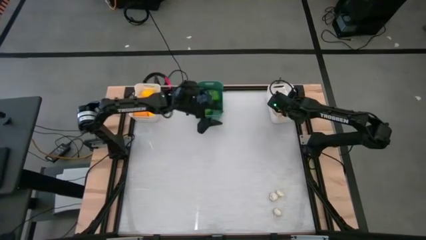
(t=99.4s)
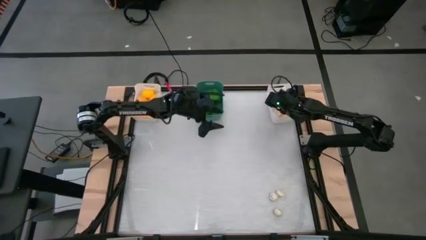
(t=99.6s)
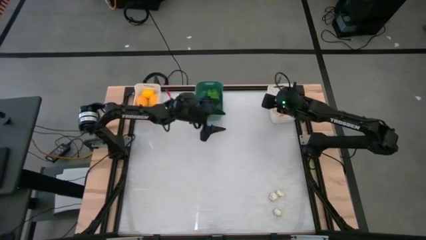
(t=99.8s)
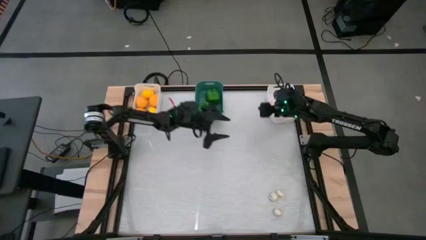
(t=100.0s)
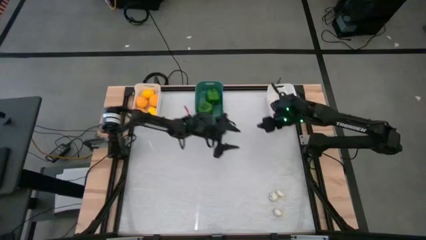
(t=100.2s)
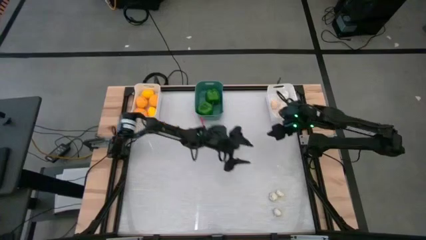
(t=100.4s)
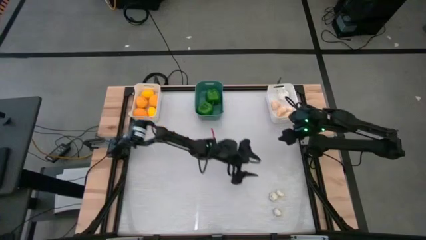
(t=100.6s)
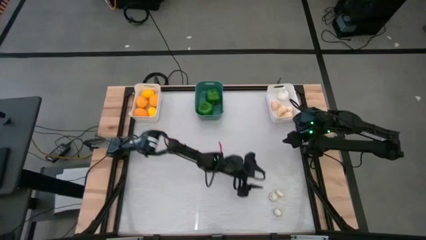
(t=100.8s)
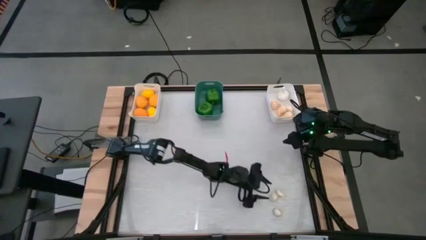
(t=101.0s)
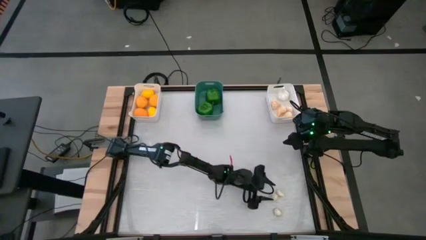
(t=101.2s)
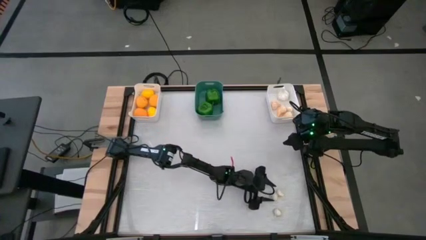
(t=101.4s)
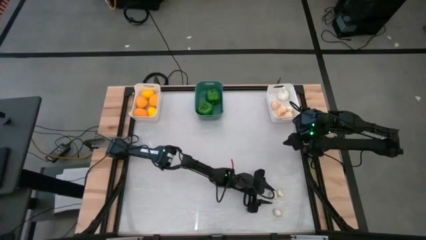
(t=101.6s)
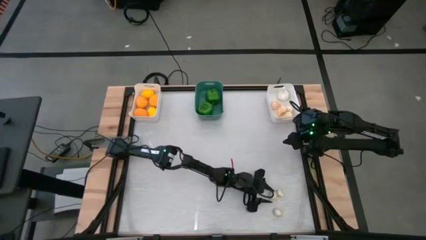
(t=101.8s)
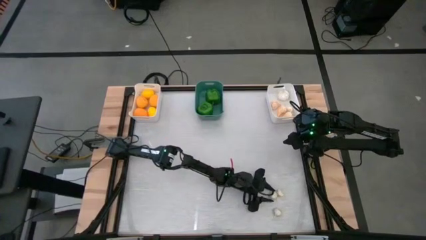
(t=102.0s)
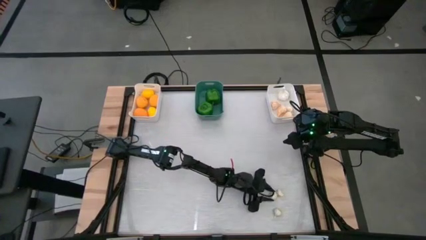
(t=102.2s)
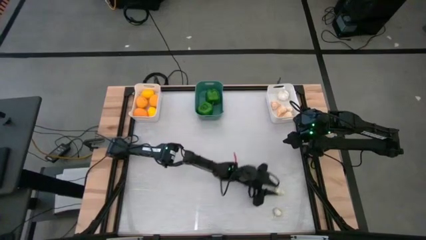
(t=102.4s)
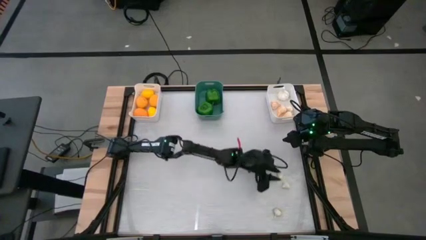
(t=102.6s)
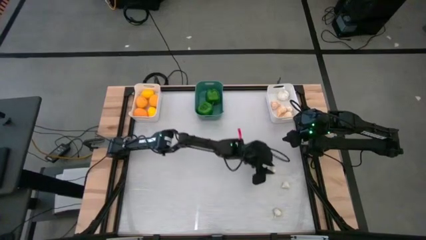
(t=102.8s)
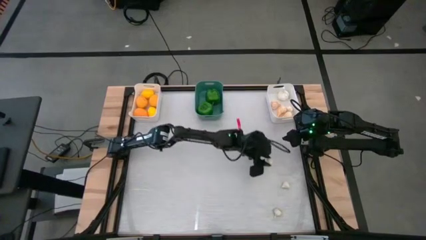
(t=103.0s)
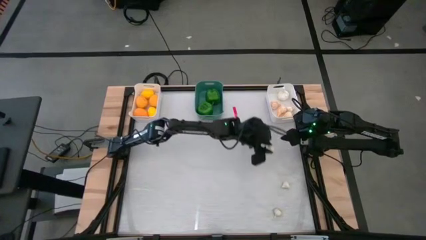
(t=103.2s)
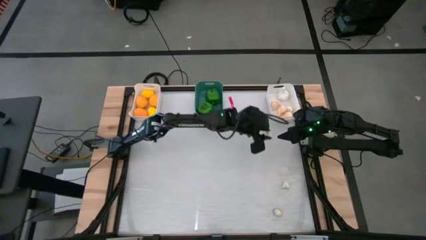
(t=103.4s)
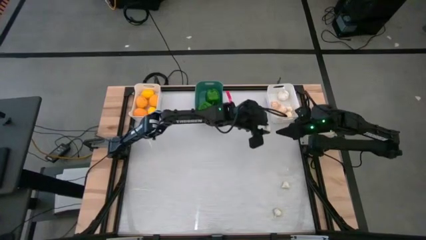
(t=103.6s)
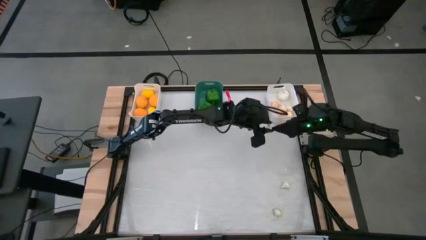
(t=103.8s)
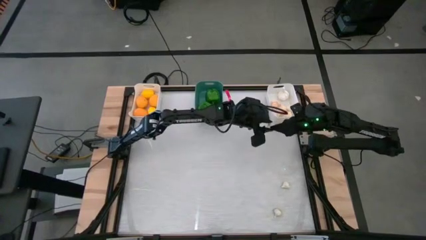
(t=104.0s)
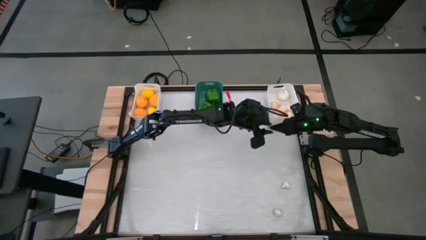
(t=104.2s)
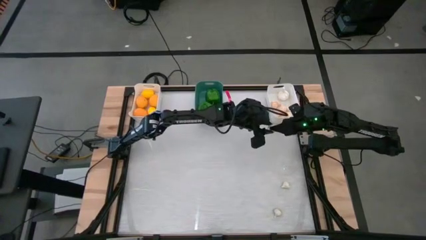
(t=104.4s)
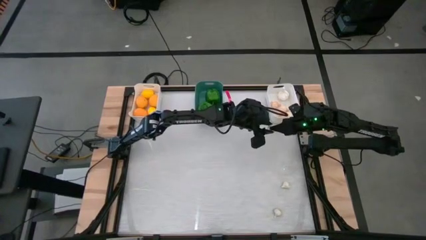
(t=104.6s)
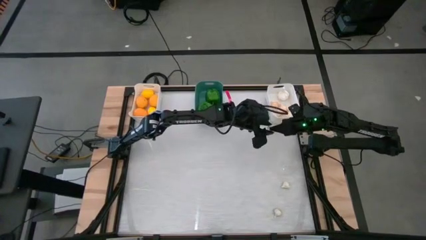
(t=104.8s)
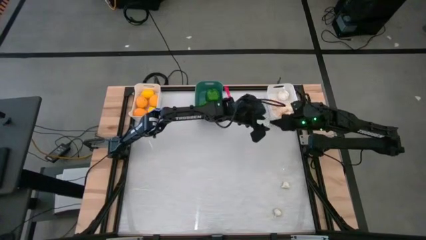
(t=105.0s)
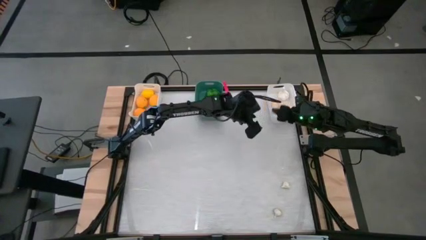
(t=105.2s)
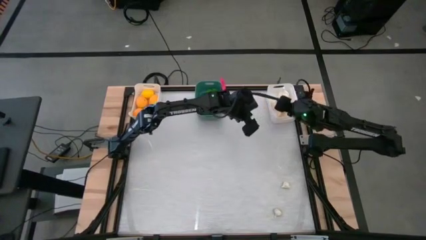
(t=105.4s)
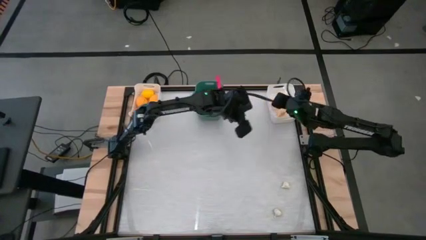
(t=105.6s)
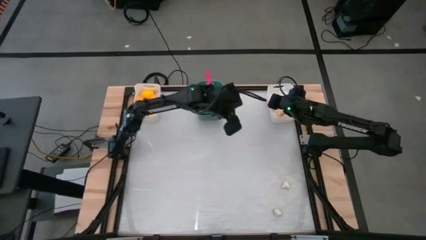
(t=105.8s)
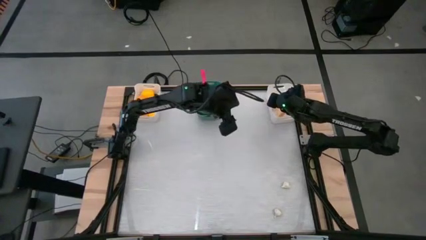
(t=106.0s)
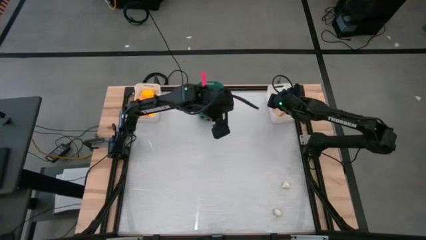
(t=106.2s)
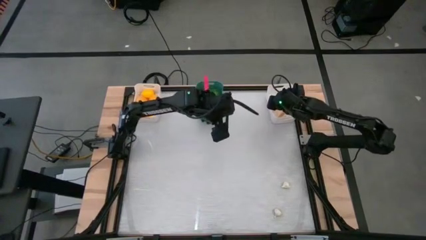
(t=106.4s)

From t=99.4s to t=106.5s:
Task: Sort produce into baskets
Put the middle right white garlic into the right white bin

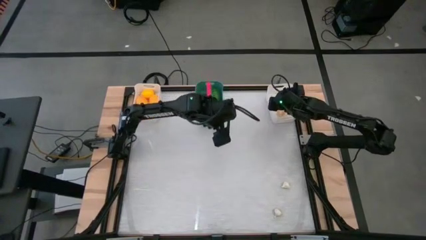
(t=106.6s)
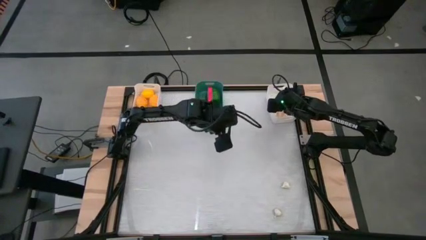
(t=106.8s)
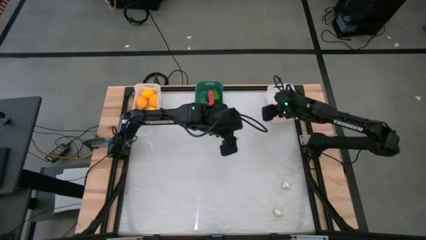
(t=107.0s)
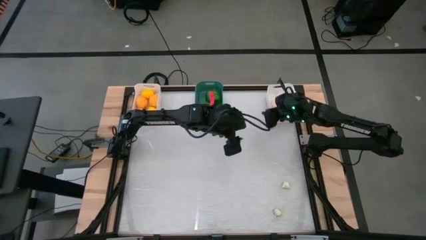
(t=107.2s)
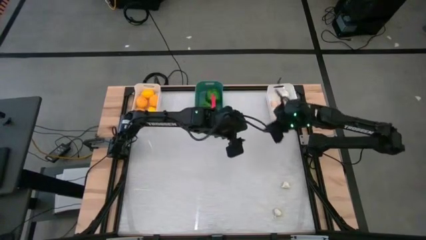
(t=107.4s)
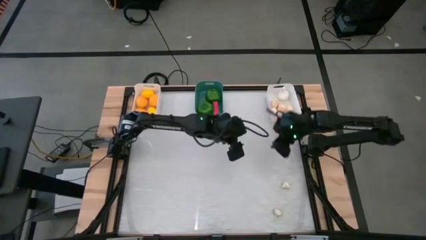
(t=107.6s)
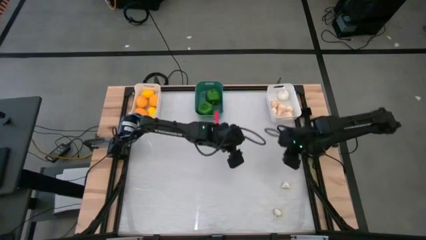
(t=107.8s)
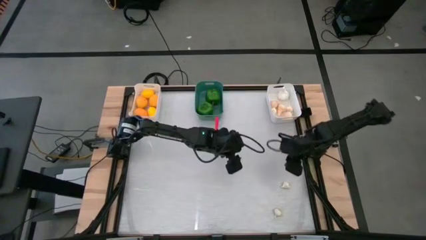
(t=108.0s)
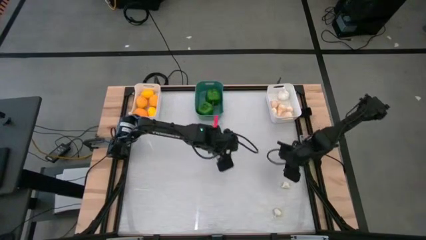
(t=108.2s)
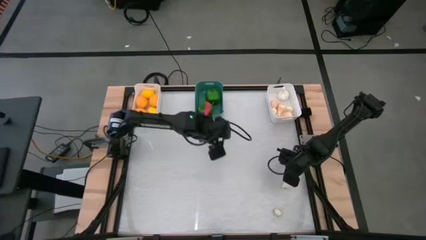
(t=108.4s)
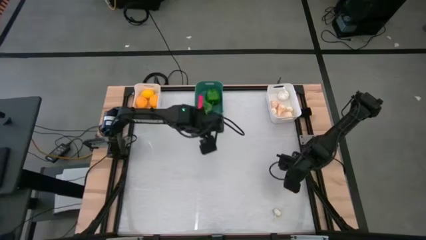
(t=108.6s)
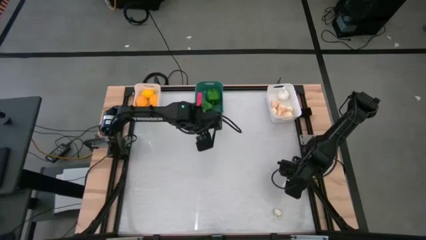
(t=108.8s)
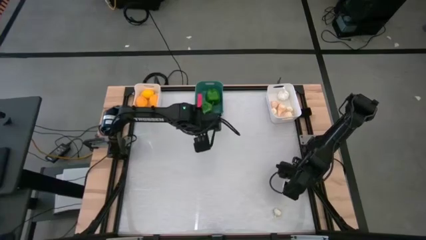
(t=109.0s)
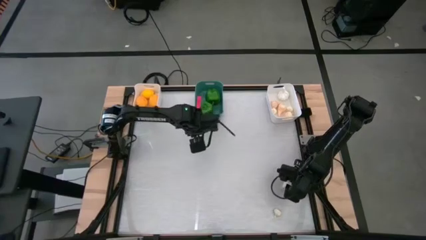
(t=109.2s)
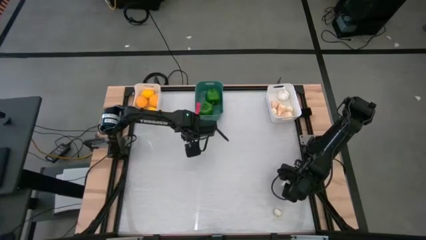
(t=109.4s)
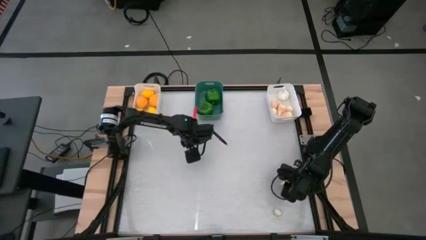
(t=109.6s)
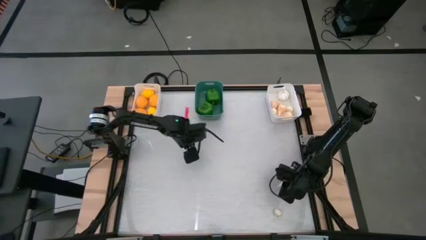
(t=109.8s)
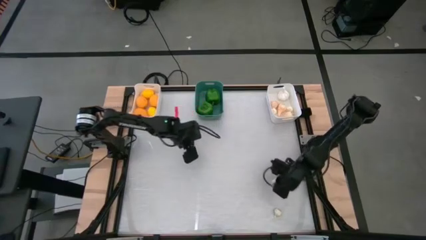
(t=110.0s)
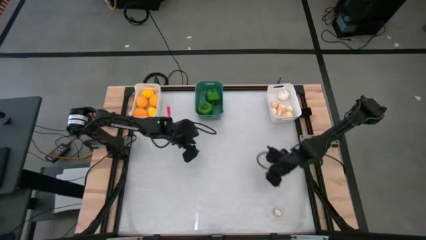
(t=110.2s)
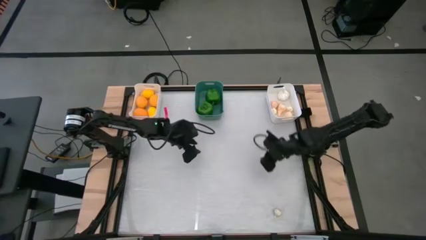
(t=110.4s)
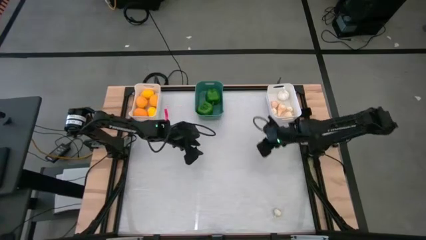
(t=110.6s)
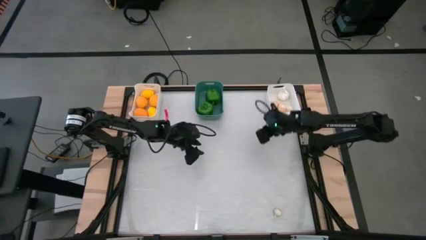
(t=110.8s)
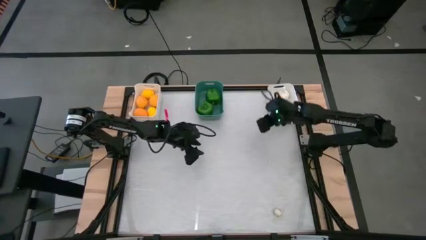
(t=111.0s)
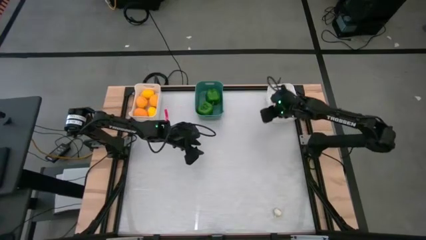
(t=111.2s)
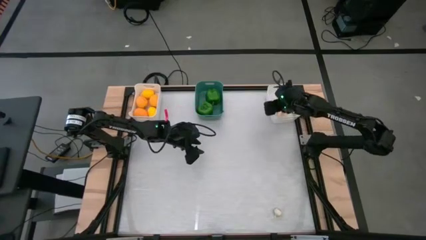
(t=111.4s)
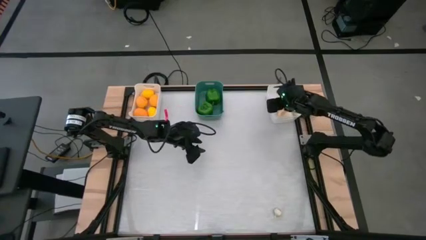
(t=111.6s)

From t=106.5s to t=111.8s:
Put the top white garlic into the right white bin

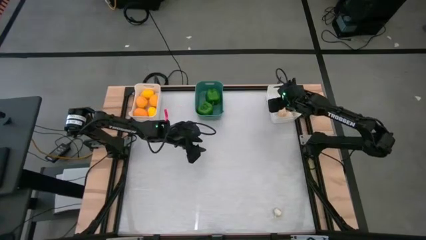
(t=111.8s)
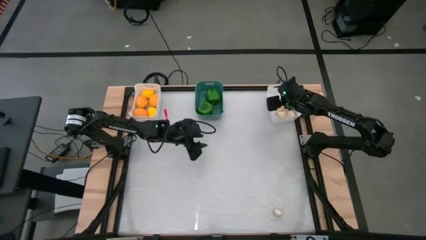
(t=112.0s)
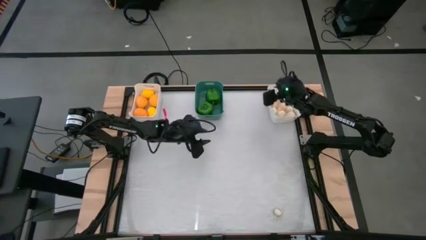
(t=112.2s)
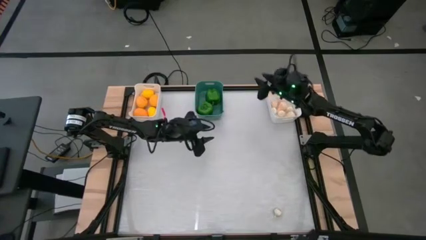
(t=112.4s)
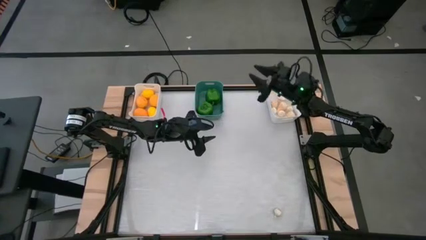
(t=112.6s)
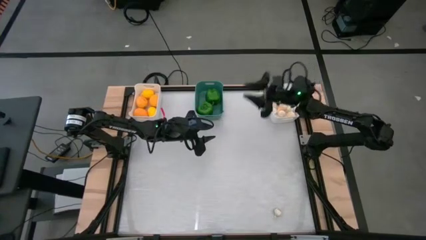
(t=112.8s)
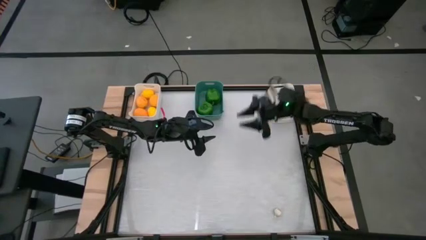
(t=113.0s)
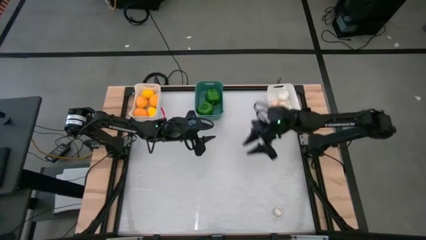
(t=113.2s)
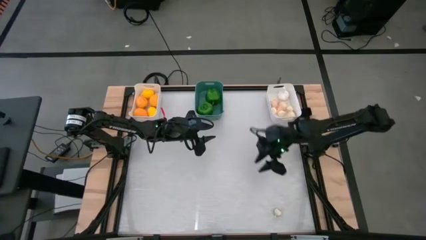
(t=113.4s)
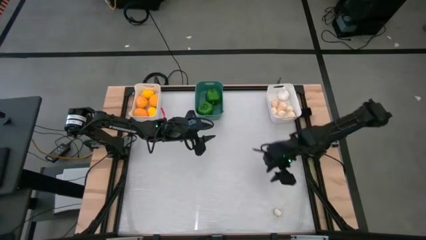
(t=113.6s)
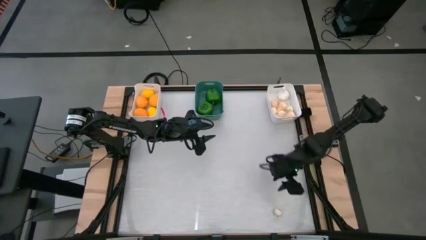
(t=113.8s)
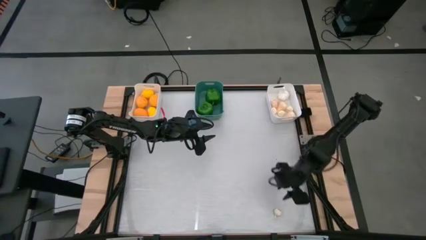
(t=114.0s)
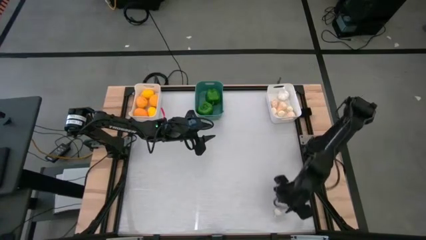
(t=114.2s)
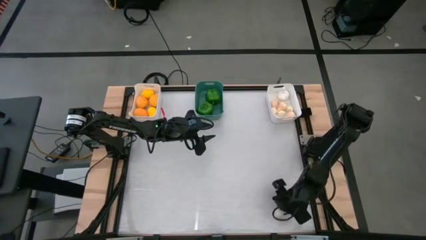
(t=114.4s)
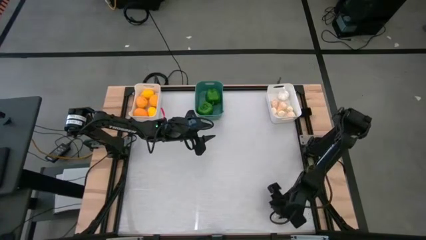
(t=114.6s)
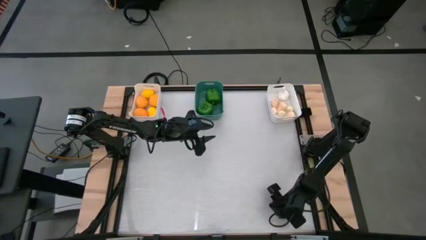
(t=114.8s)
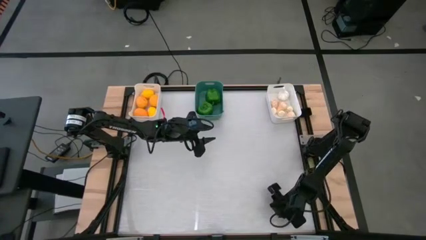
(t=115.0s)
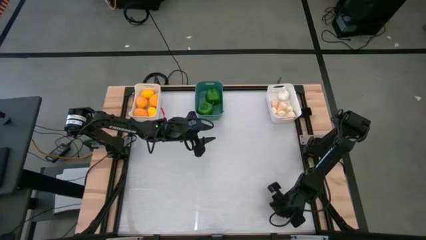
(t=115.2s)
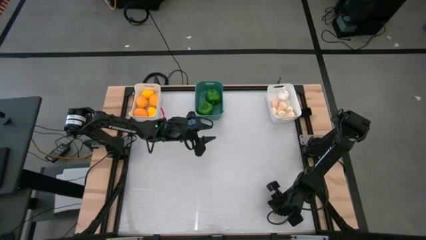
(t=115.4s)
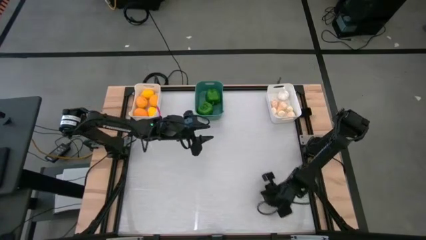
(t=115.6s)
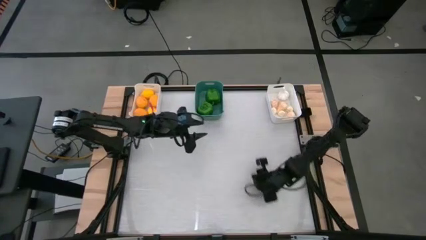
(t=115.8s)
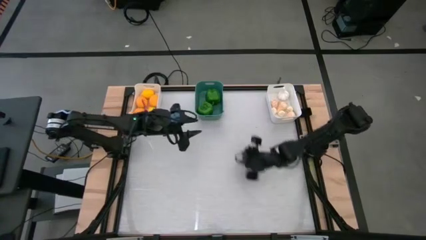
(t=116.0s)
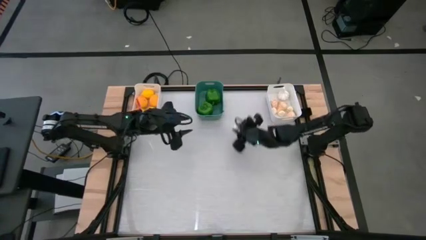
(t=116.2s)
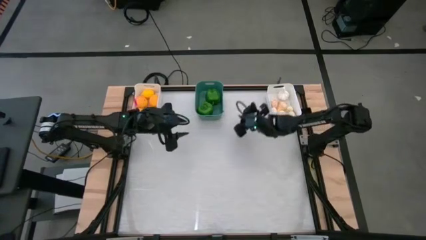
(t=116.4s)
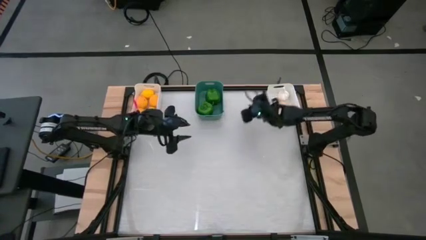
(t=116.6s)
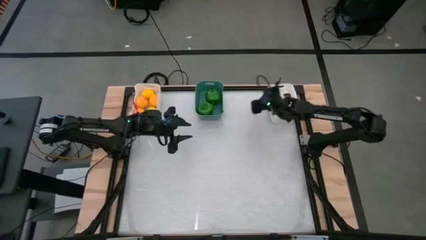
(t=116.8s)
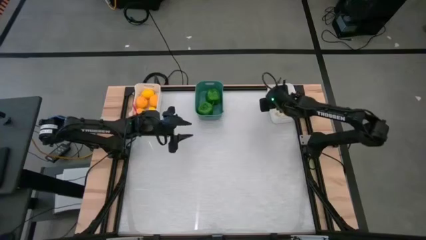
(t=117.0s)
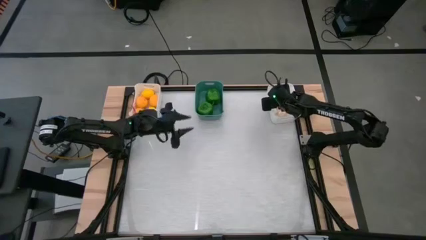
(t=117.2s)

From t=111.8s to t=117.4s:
Put the white garlic into the right white bin
